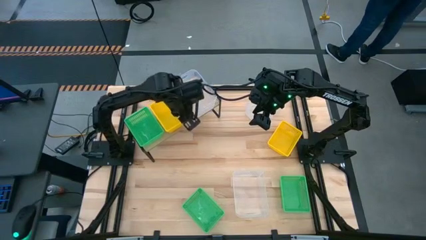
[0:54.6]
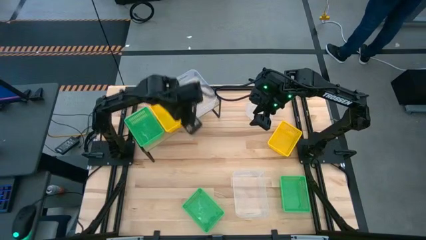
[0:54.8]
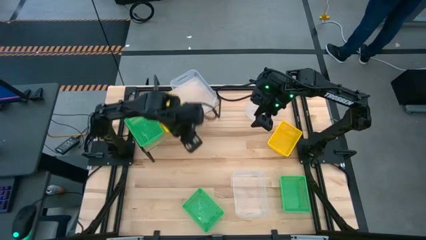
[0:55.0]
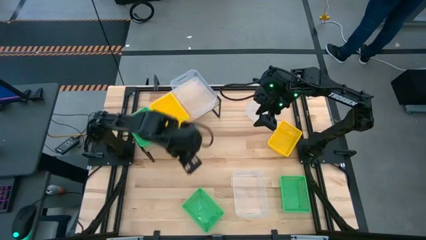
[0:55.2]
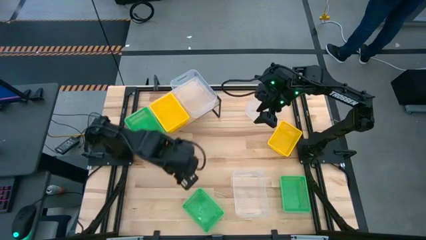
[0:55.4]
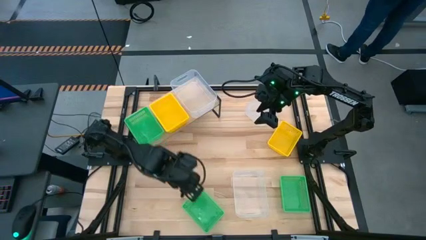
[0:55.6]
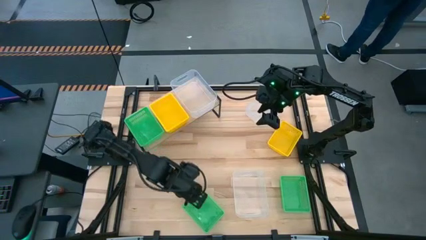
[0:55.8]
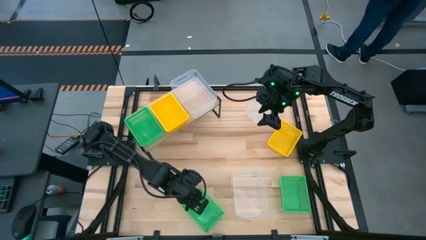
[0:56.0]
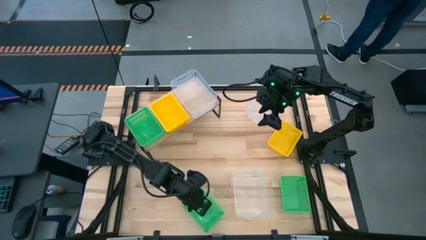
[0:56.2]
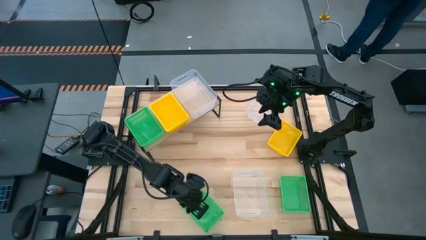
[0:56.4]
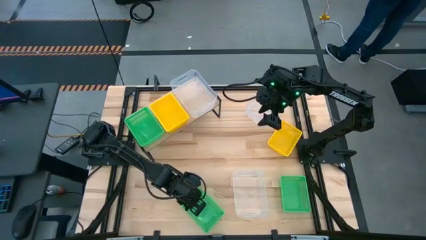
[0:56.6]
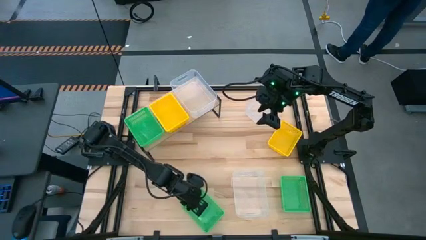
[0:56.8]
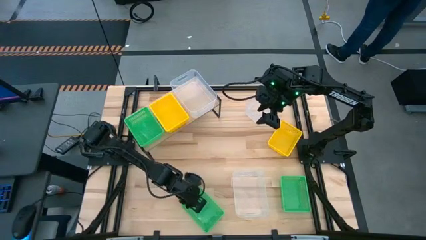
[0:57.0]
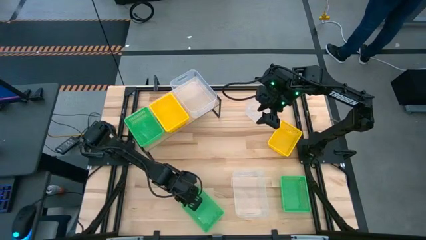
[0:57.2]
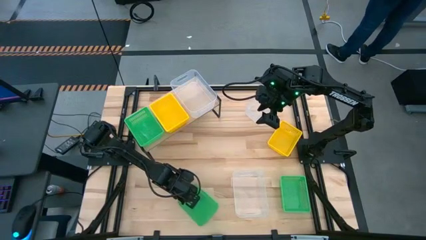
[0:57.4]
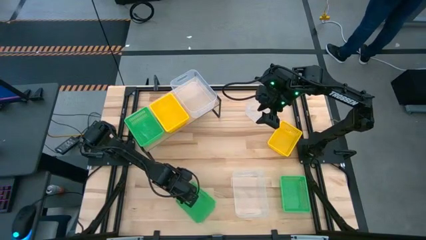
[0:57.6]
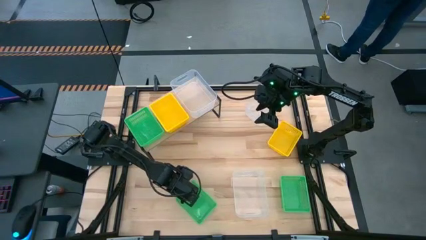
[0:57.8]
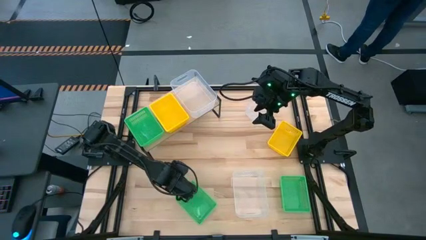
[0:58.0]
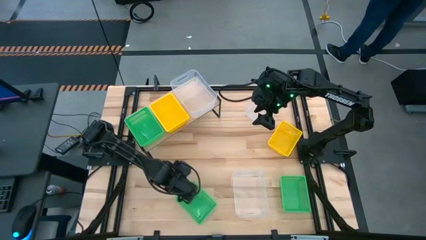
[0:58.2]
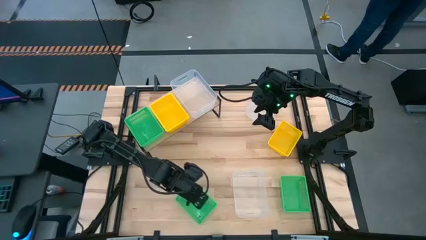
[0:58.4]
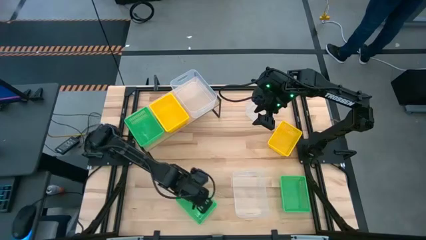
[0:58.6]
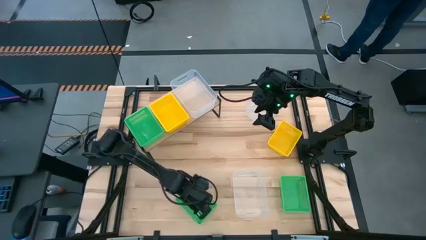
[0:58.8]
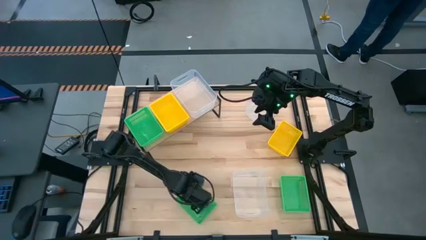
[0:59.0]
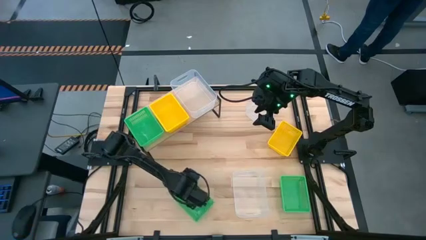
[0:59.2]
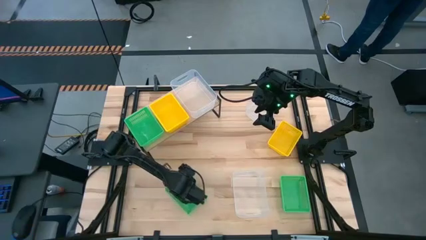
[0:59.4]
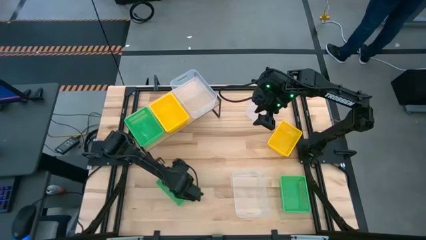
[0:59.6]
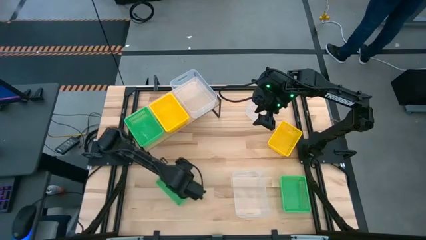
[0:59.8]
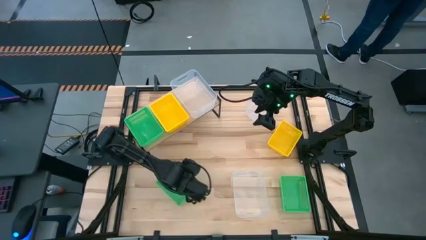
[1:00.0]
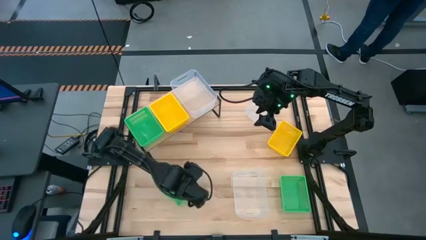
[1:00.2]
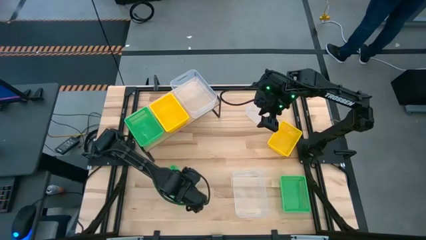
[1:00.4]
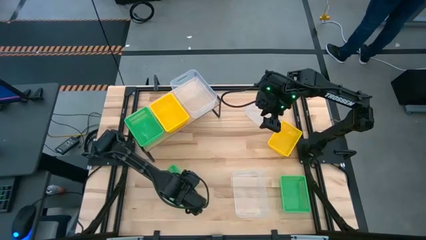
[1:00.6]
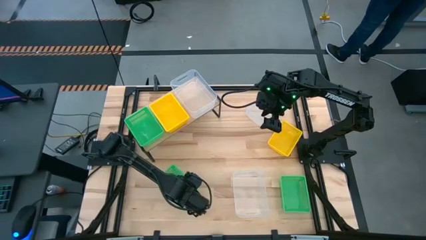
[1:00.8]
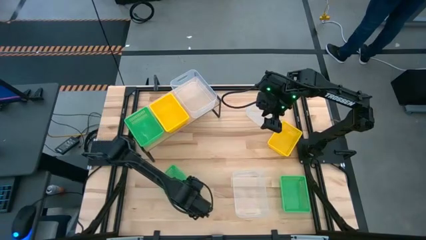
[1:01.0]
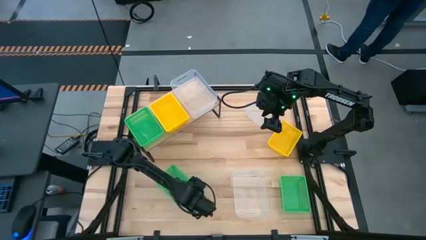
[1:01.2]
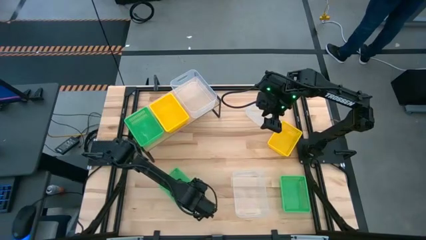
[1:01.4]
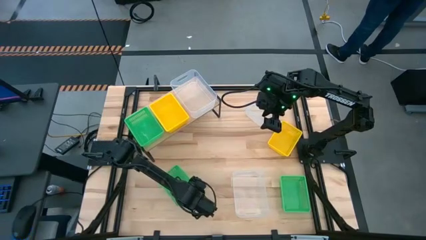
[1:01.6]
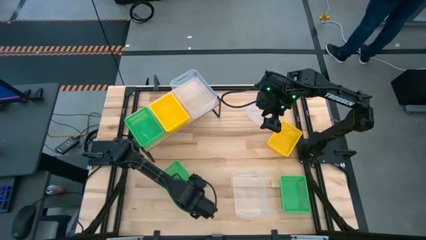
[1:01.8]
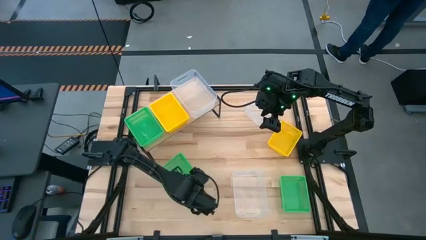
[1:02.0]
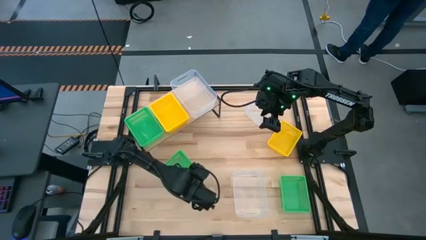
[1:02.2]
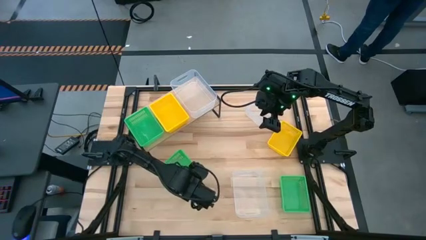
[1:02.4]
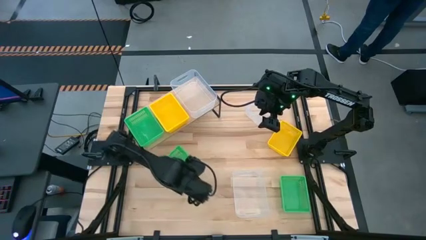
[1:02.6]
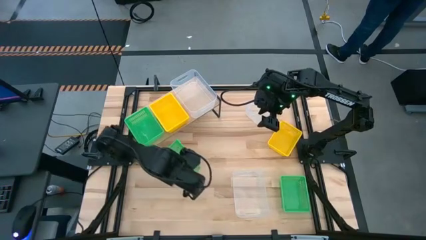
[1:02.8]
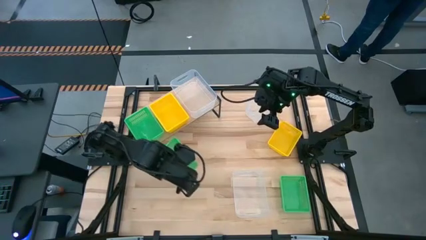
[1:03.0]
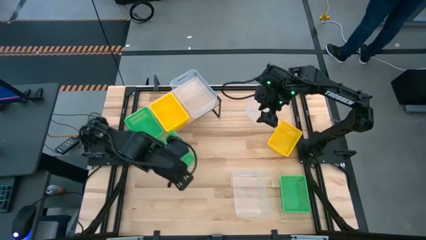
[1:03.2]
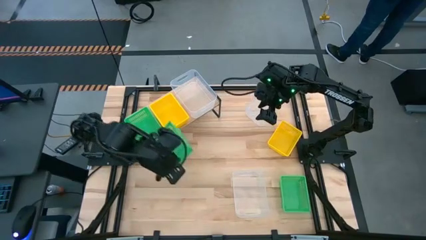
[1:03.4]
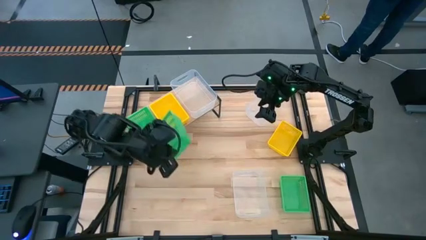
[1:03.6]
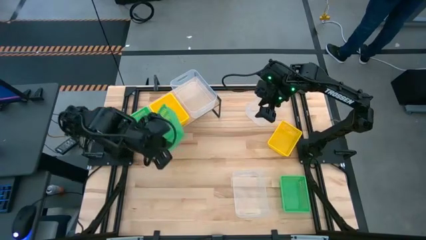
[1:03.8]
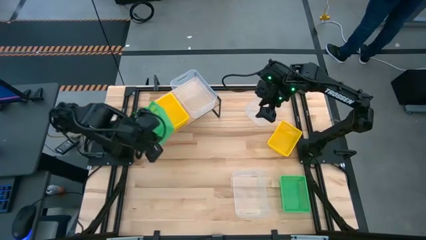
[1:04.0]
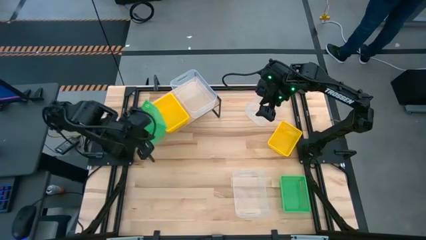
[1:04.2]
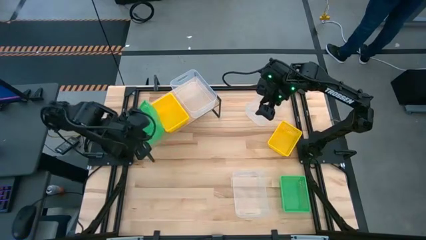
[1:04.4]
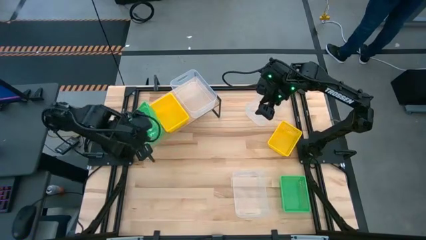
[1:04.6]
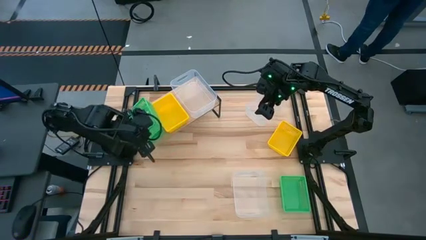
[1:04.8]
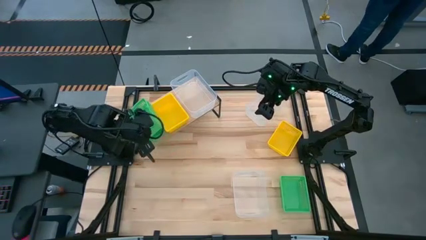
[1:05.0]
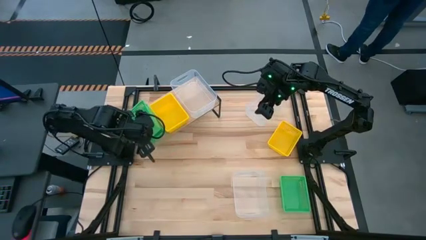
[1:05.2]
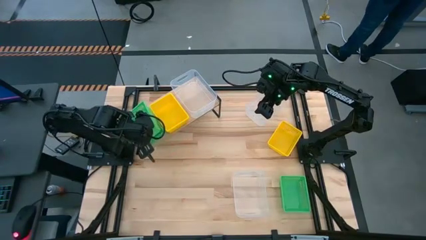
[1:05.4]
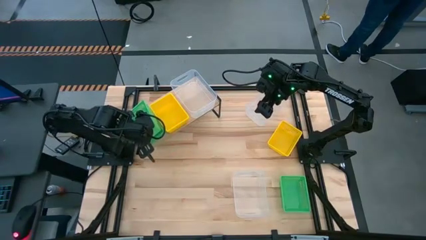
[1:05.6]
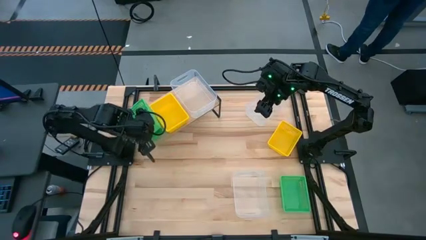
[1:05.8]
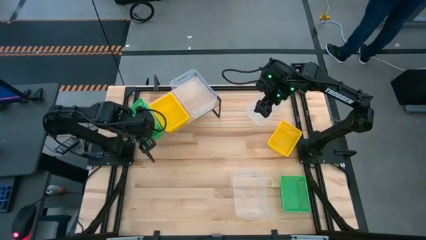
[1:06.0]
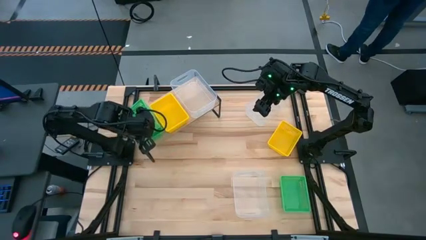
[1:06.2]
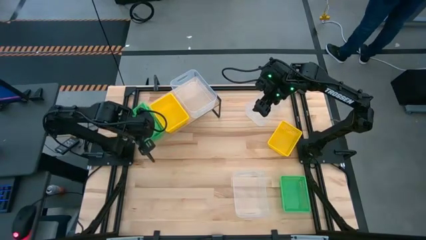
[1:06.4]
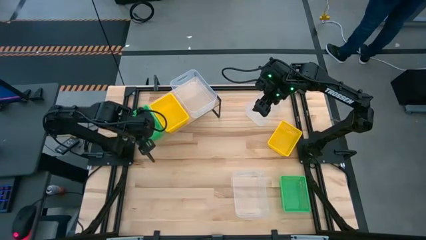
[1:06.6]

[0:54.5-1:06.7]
Task: Stack baskets on shelf by color
Stack the left green bin on top of the other green bin on the shelf
